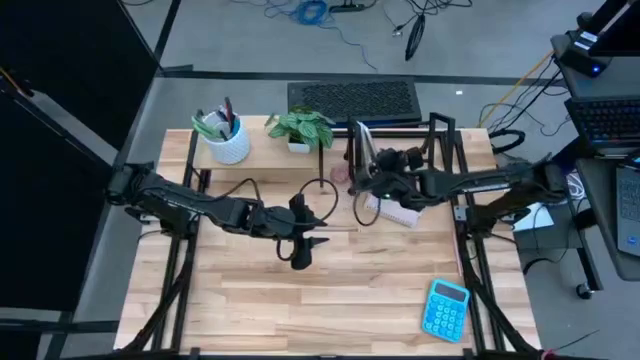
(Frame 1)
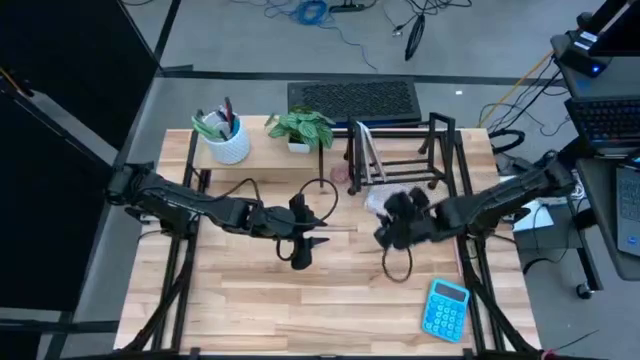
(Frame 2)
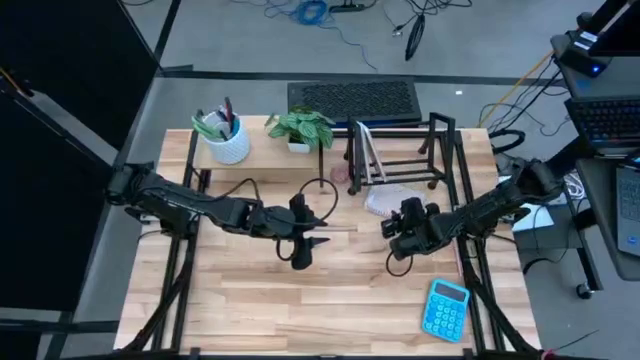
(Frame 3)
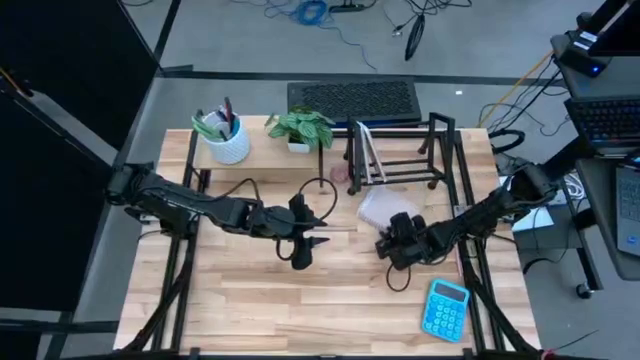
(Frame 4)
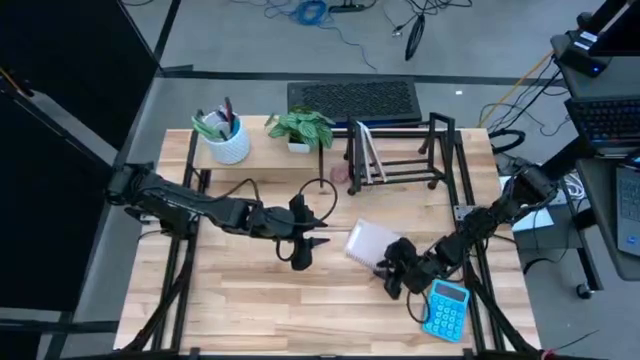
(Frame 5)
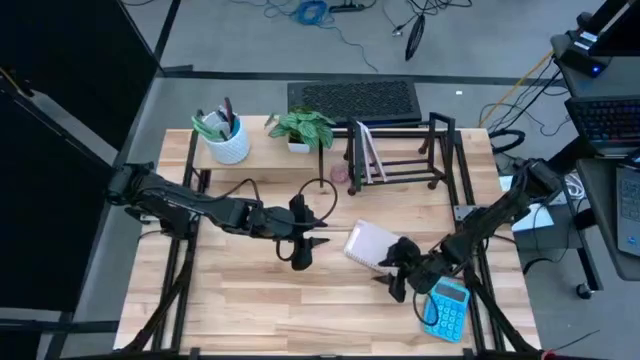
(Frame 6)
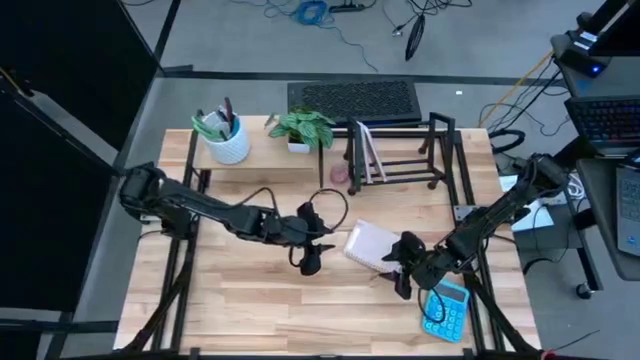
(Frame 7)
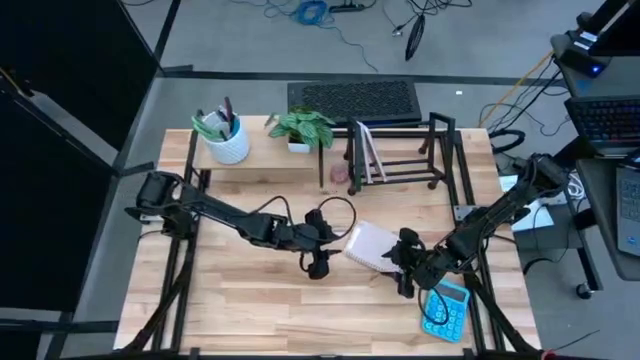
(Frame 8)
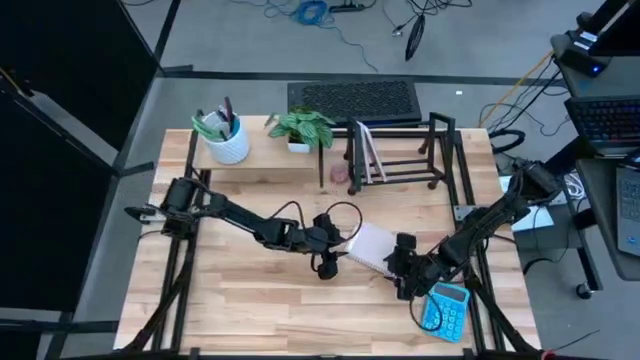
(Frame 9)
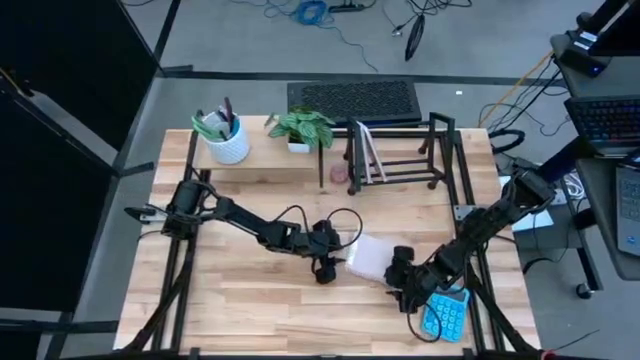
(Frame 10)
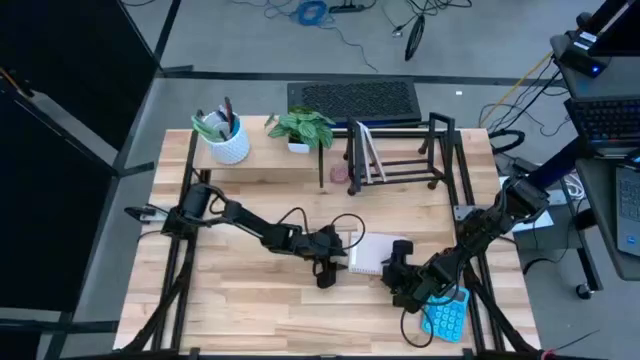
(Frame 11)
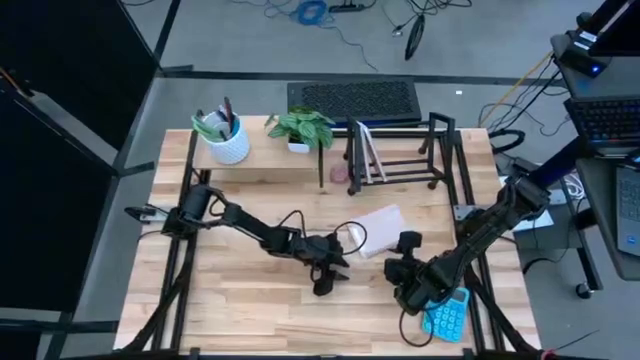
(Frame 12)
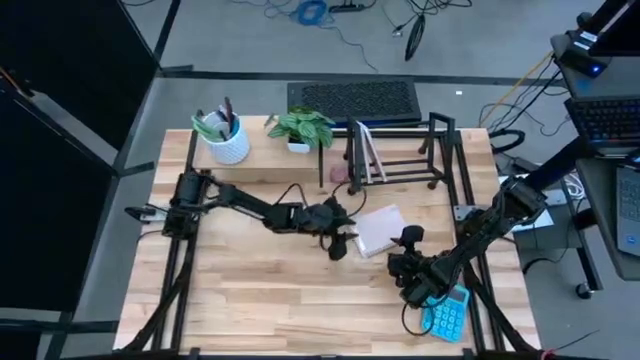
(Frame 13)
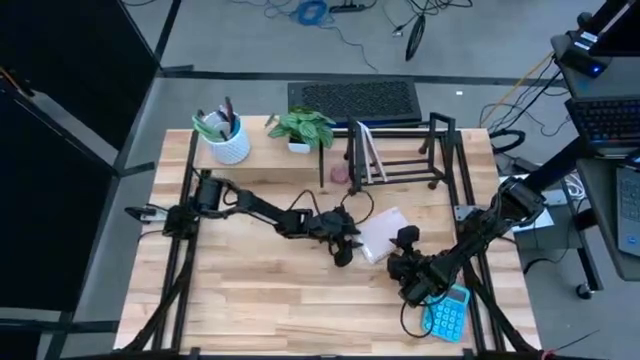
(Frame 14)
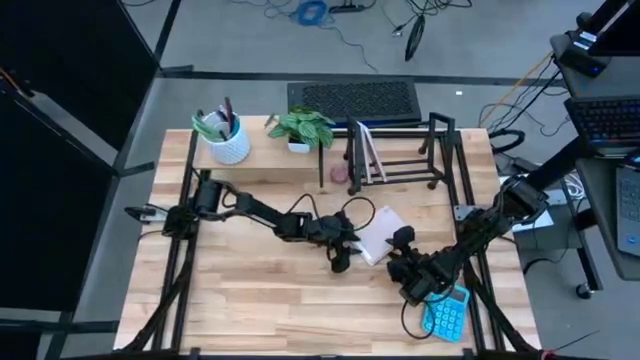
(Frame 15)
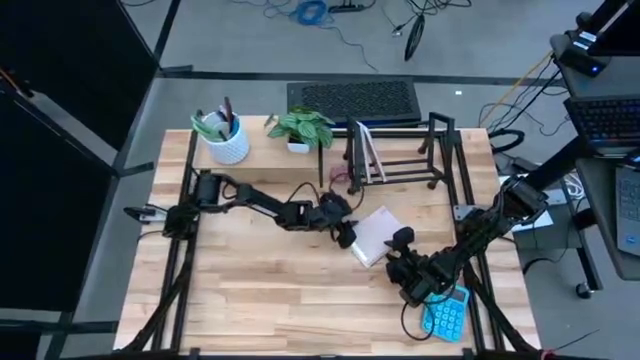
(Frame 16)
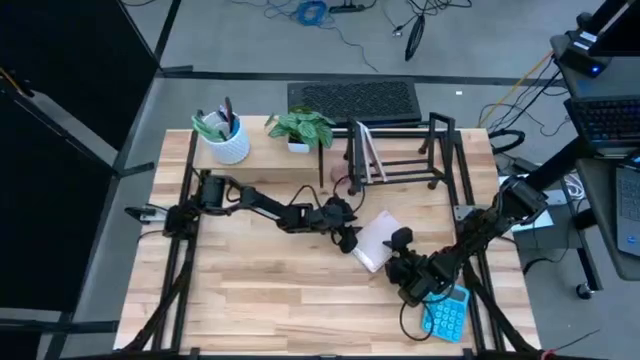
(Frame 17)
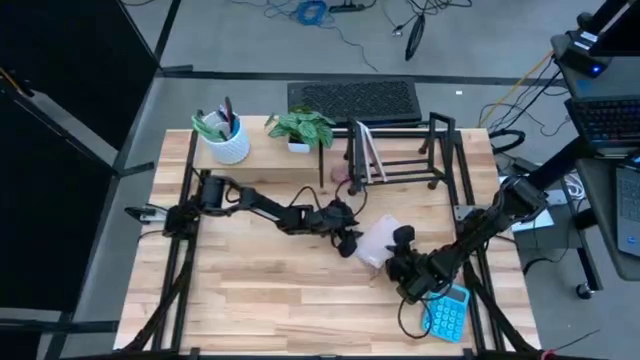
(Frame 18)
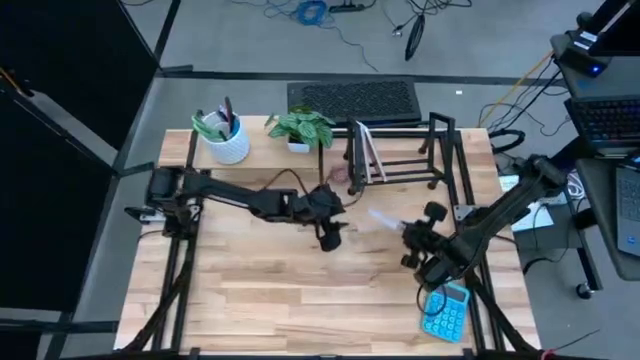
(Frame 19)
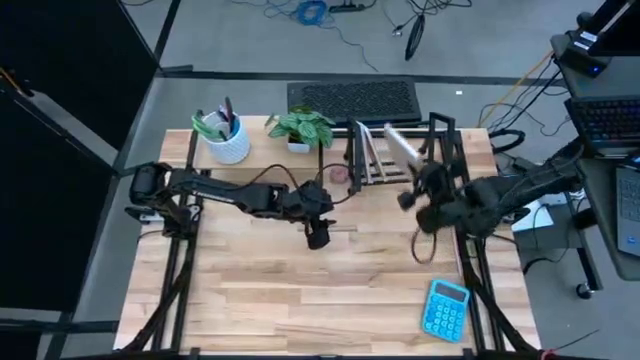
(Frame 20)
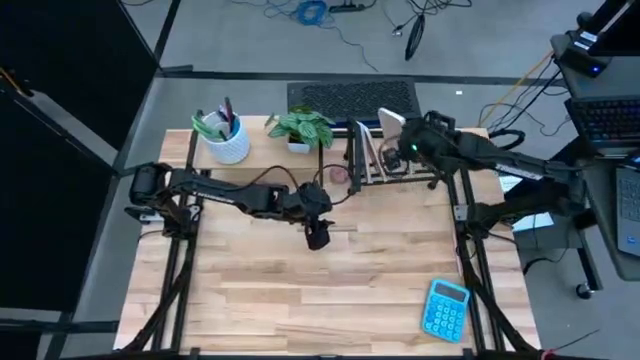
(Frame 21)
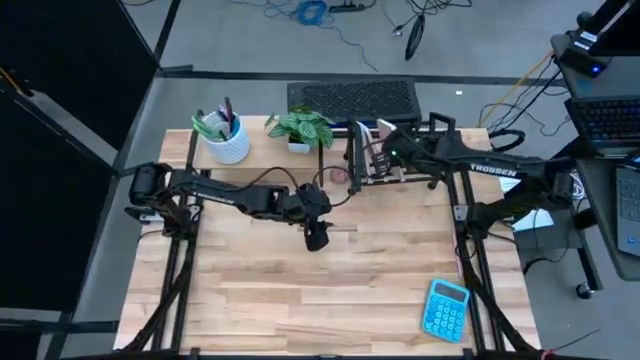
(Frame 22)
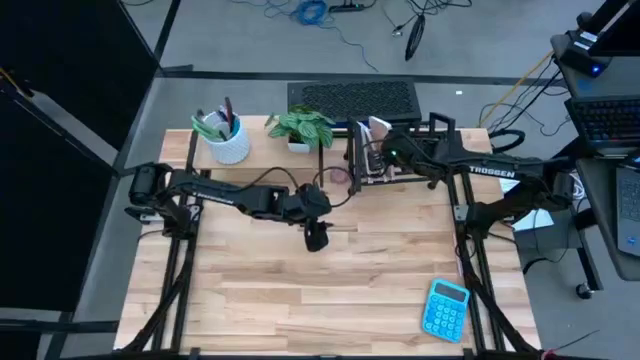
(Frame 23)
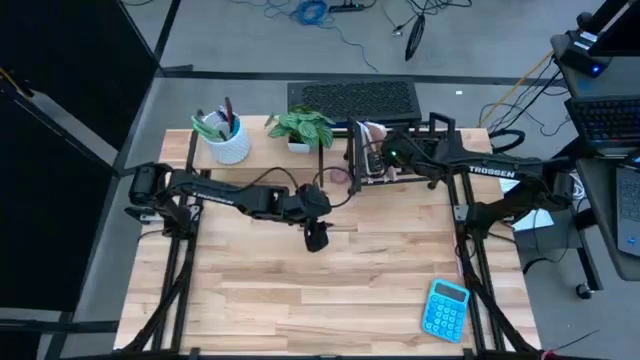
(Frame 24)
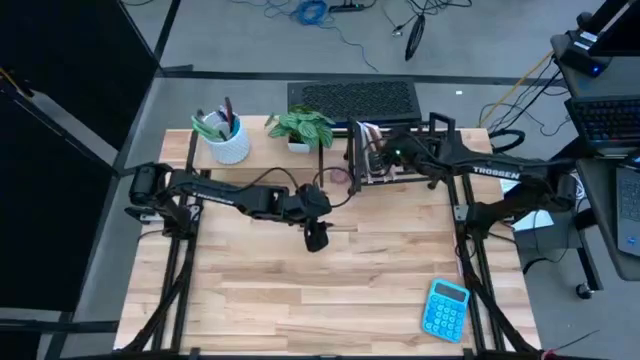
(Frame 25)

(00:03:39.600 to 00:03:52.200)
Task: Stock shelves
Put the white notebook on the black bookshelf

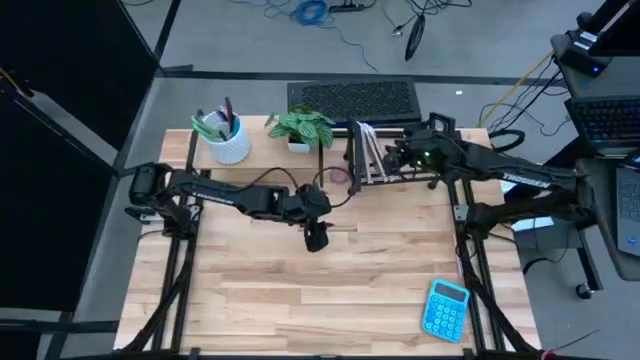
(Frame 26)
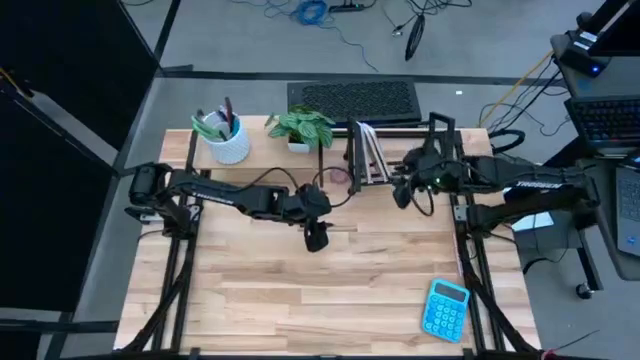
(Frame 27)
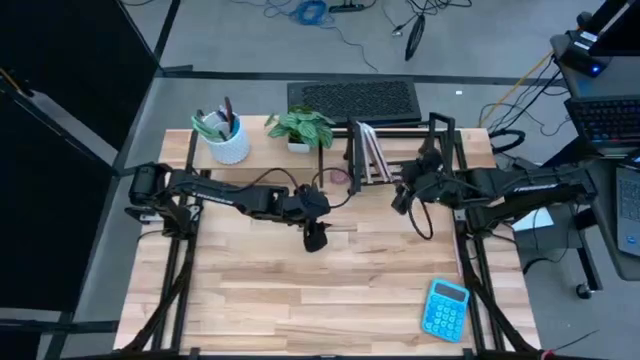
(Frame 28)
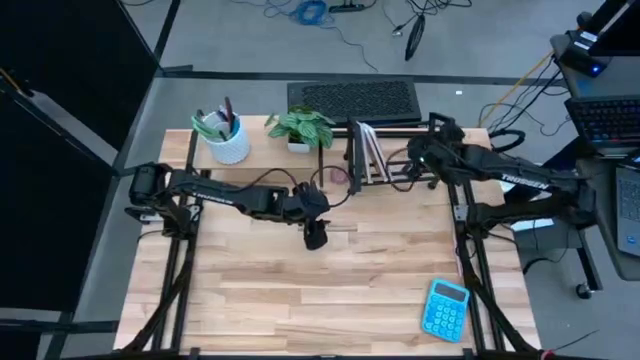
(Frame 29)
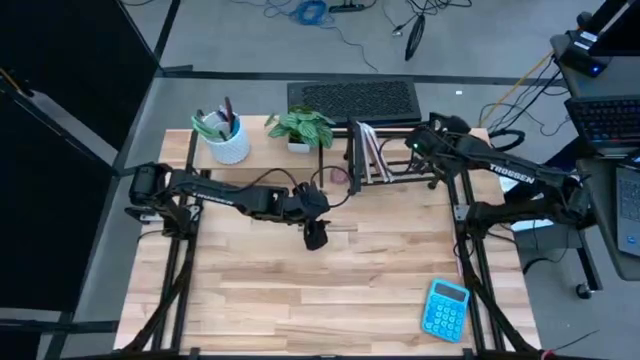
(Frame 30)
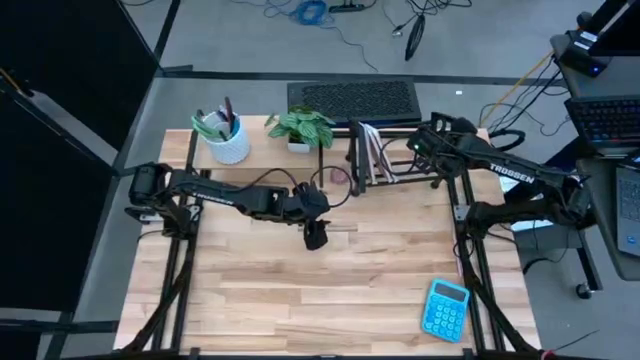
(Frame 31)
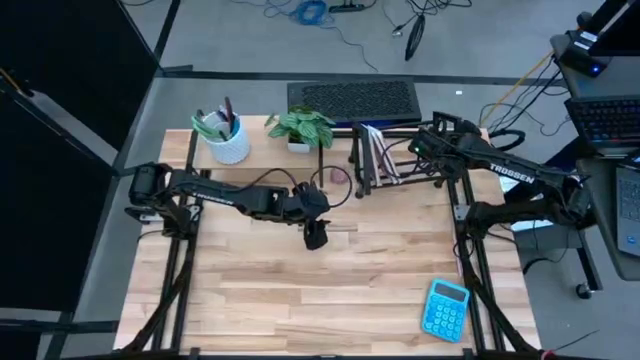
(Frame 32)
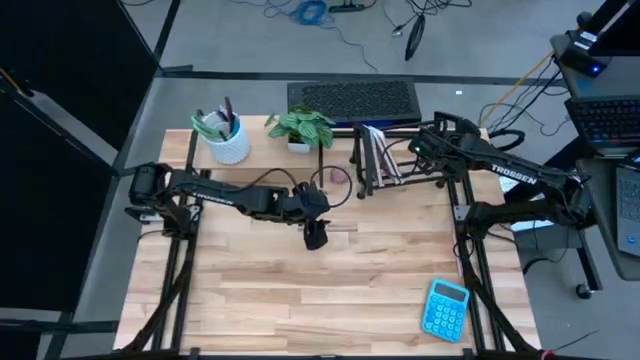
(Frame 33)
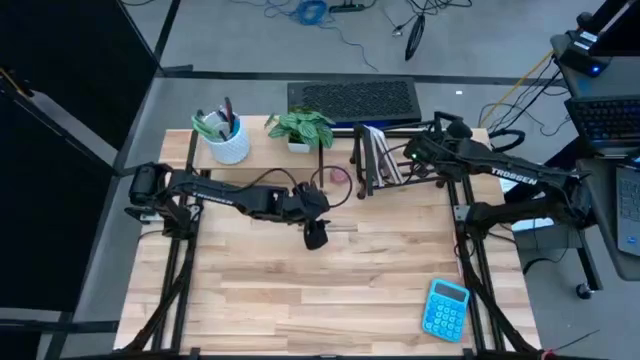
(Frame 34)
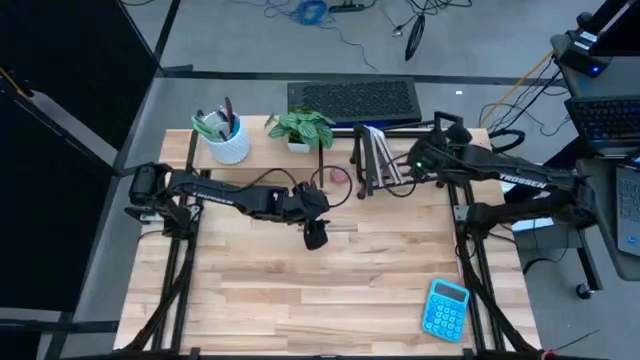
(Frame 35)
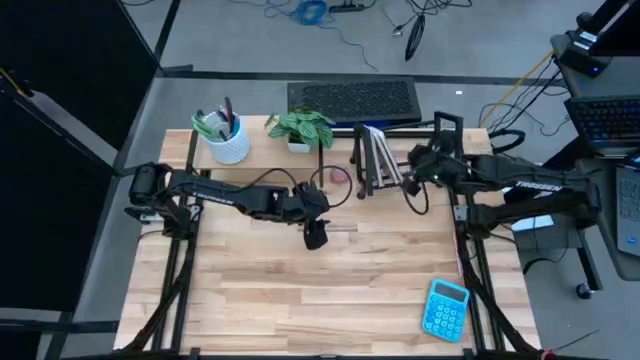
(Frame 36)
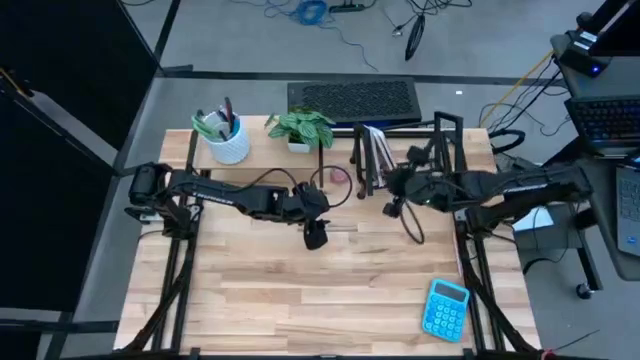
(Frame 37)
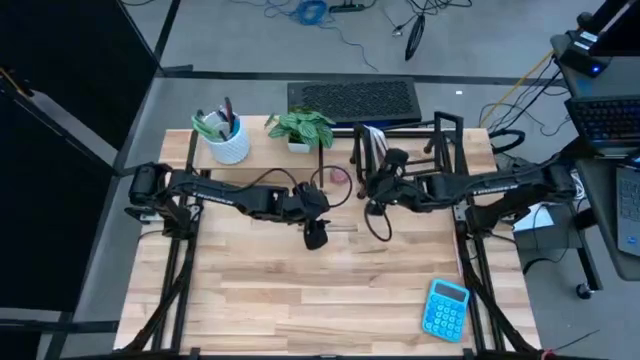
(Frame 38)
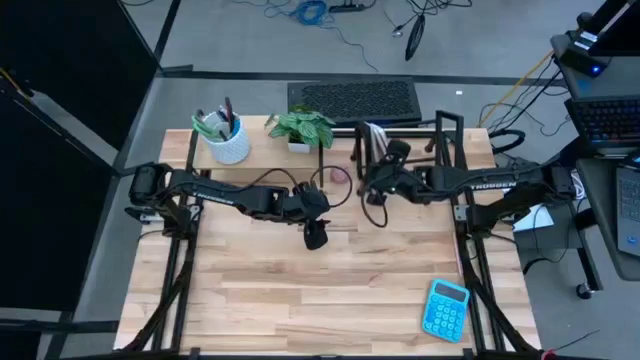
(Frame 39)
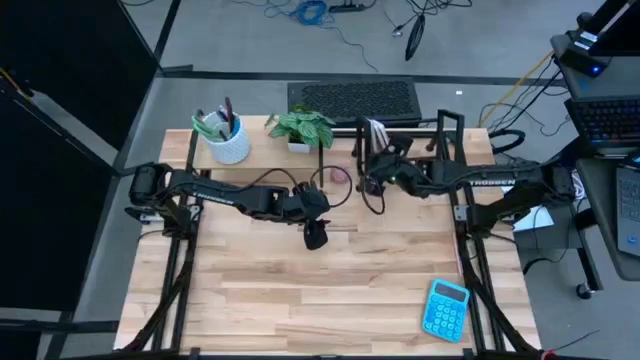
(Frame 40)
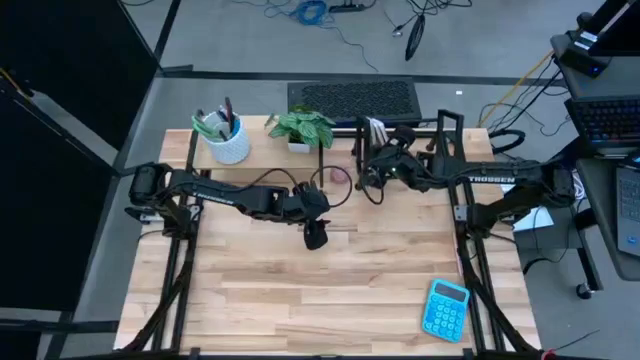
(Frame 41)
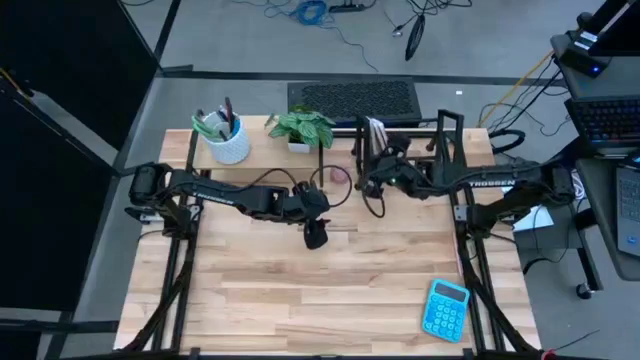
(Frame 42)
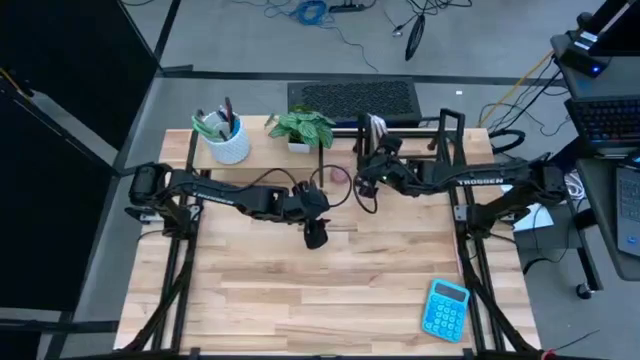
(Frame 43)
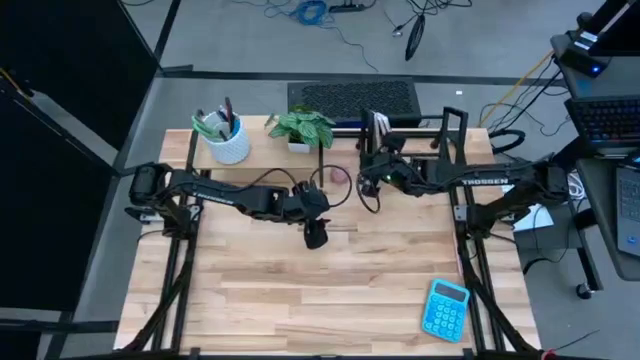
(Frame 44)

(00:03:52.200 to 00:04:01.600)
Adjust the black bookshelf
